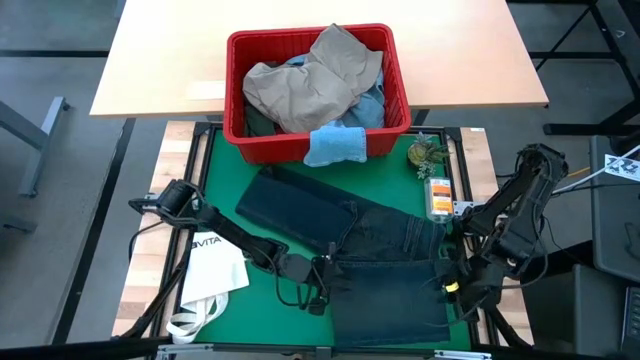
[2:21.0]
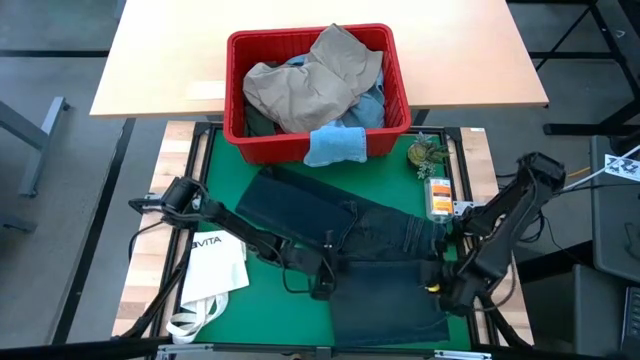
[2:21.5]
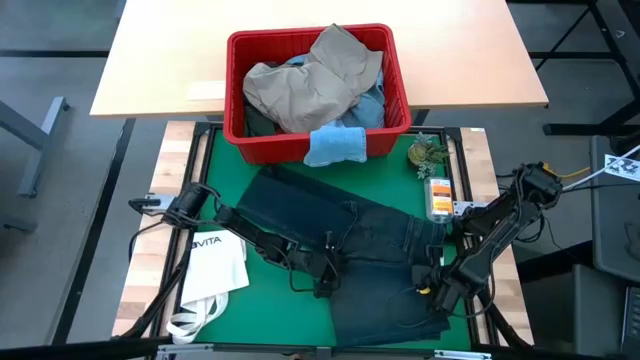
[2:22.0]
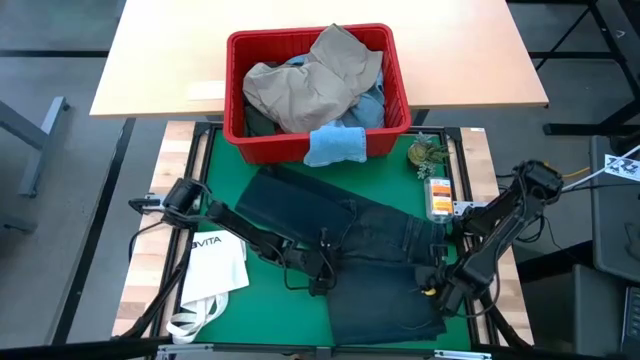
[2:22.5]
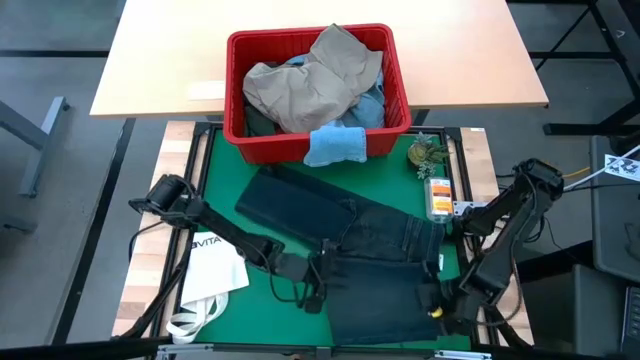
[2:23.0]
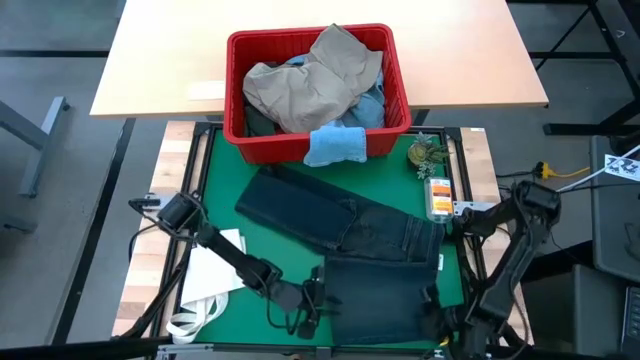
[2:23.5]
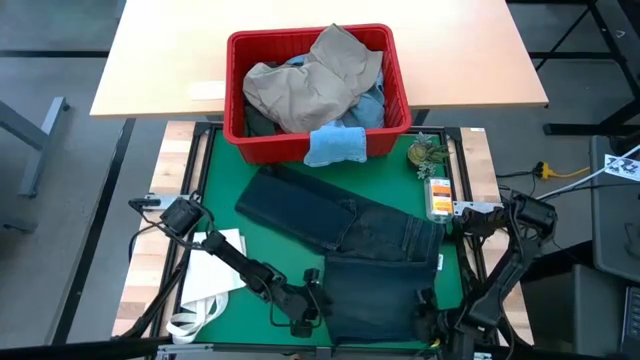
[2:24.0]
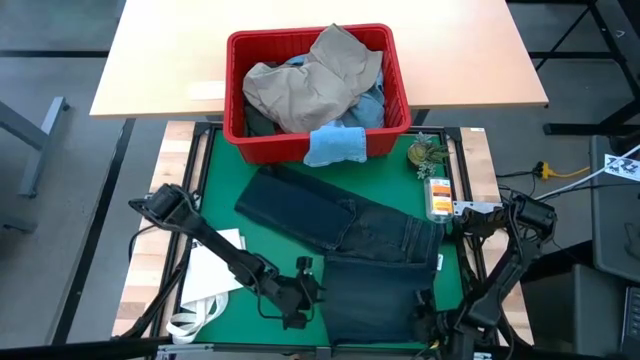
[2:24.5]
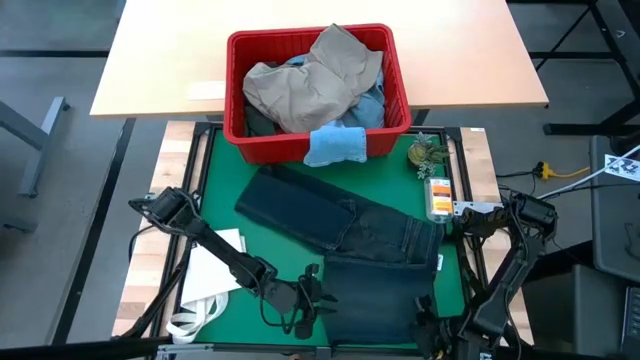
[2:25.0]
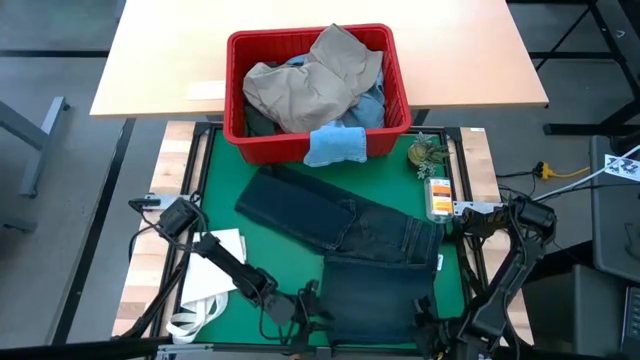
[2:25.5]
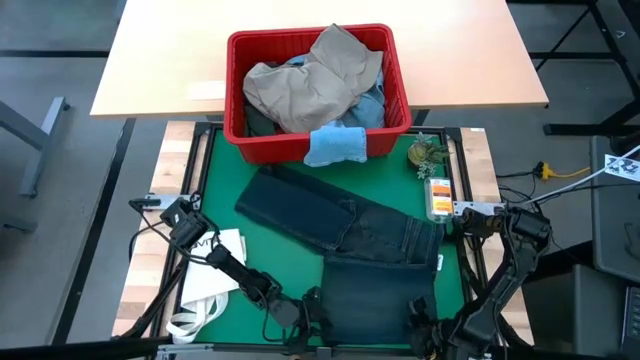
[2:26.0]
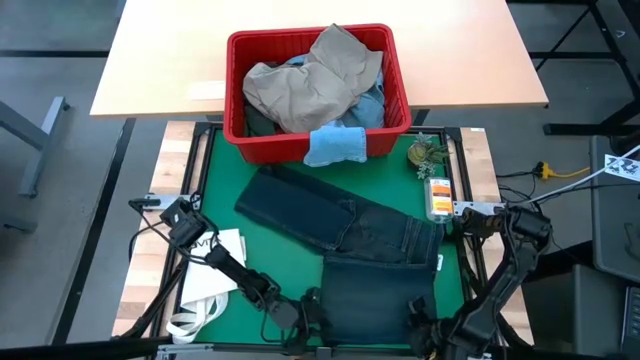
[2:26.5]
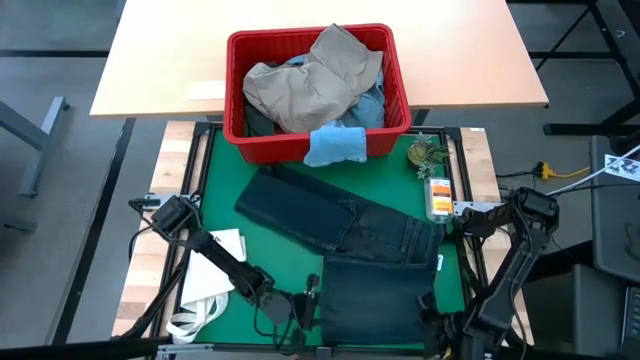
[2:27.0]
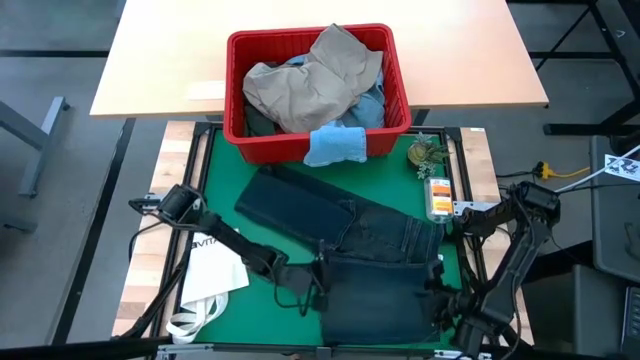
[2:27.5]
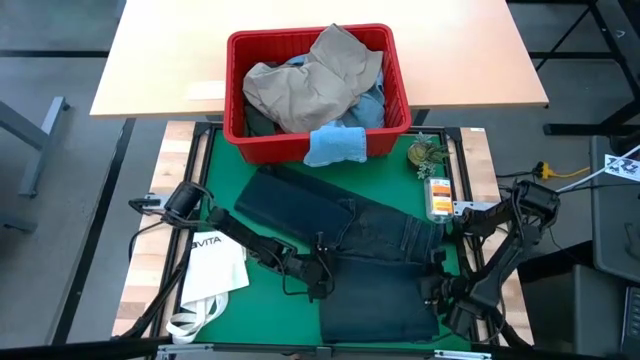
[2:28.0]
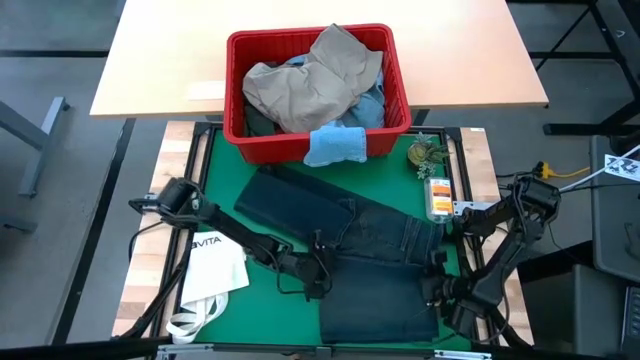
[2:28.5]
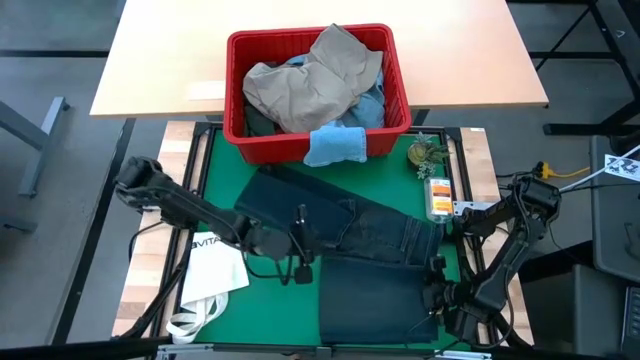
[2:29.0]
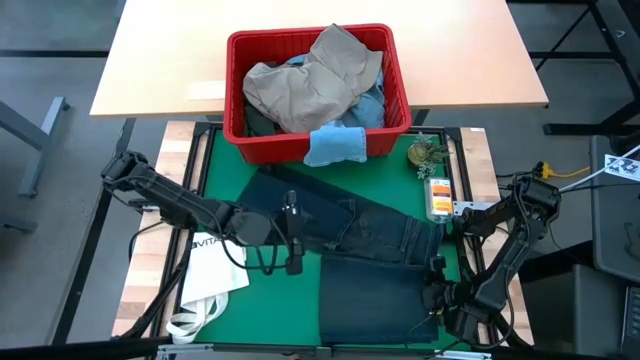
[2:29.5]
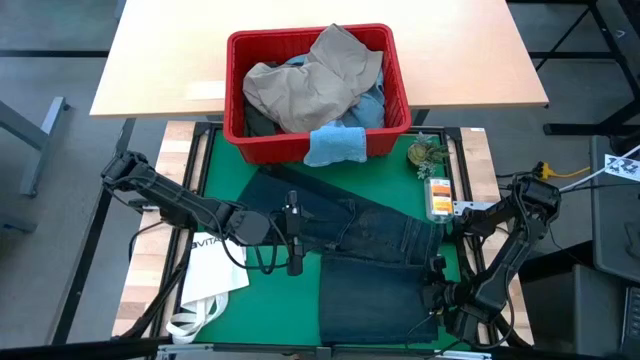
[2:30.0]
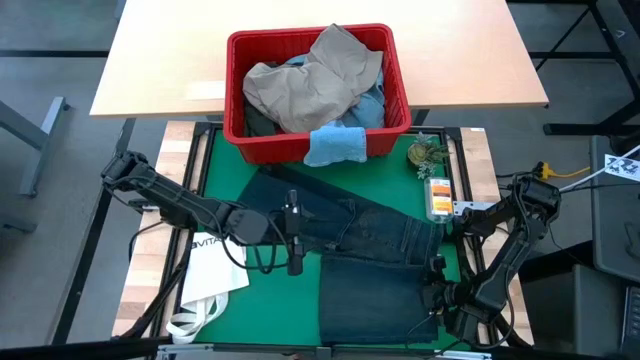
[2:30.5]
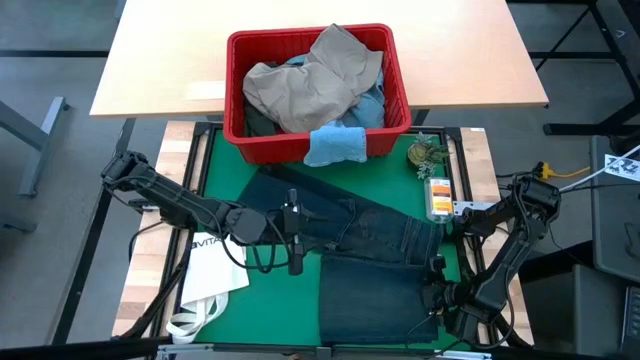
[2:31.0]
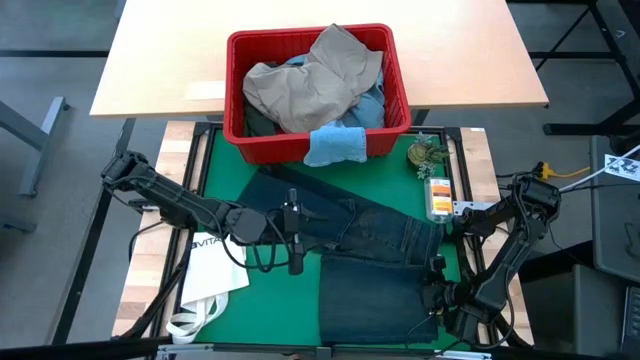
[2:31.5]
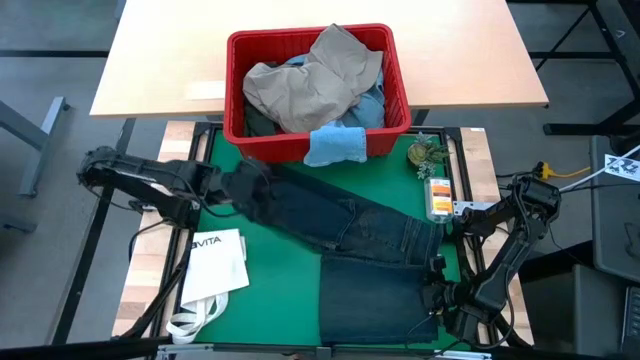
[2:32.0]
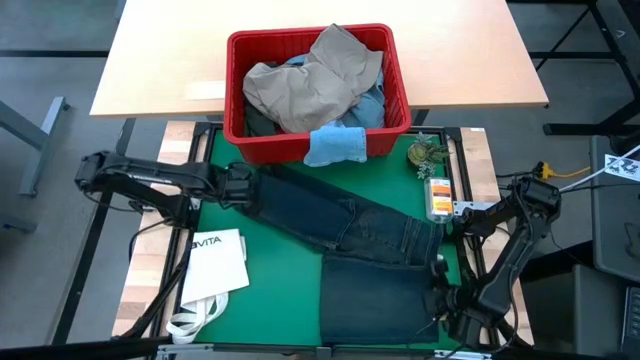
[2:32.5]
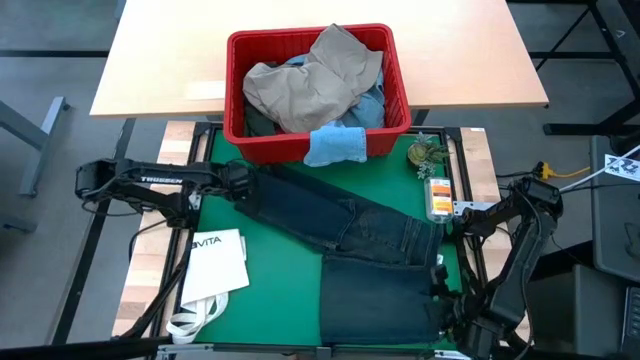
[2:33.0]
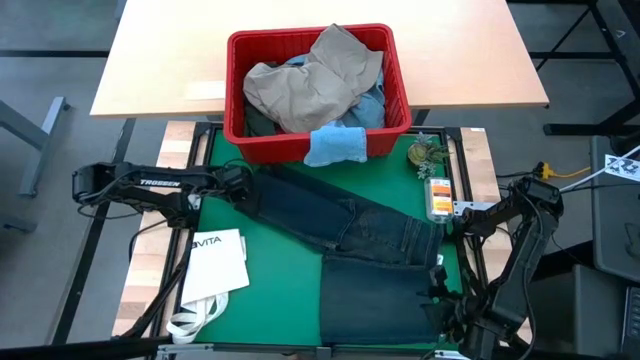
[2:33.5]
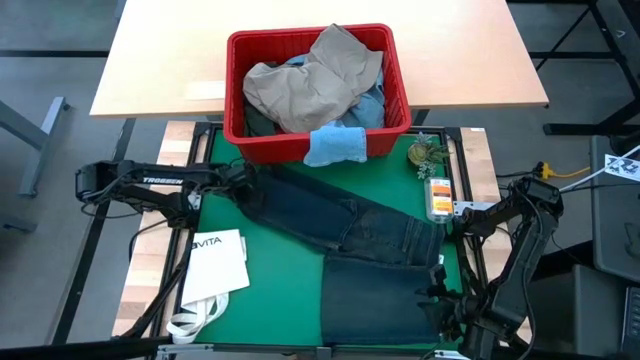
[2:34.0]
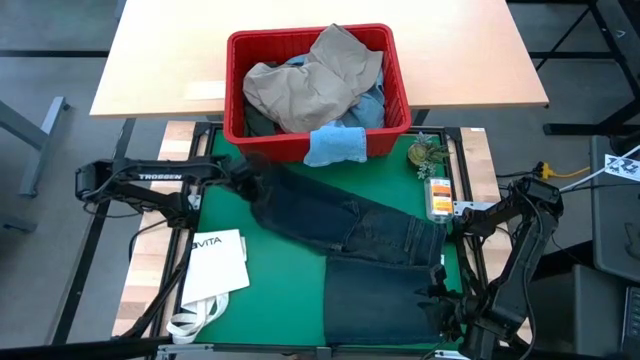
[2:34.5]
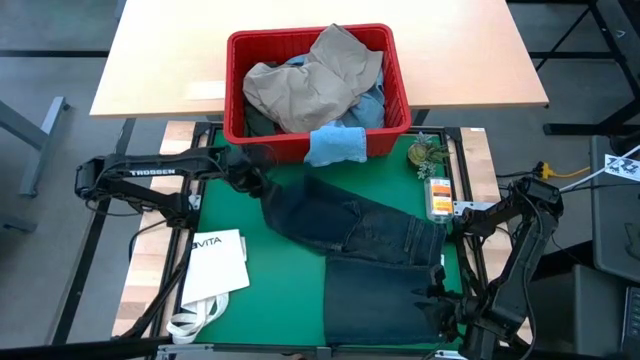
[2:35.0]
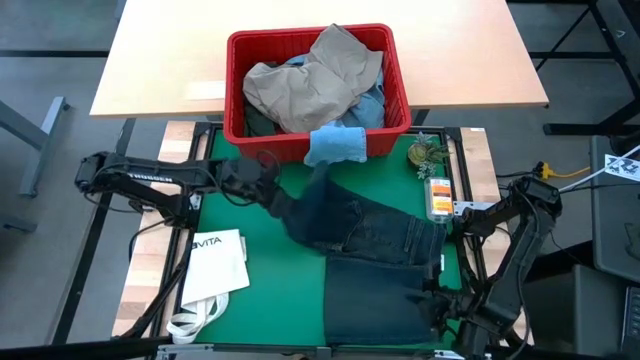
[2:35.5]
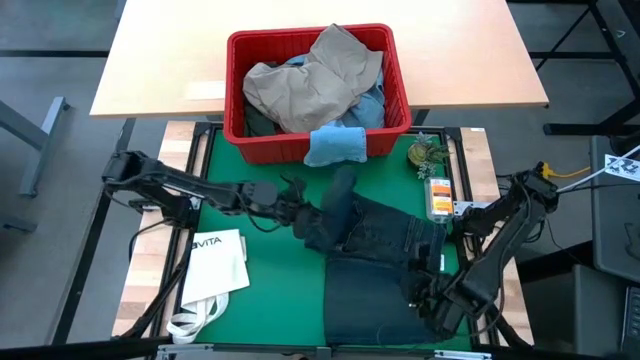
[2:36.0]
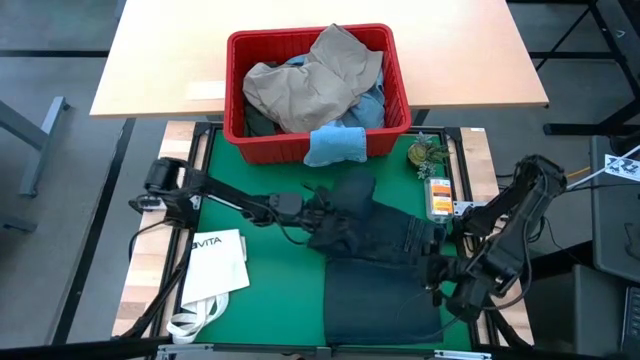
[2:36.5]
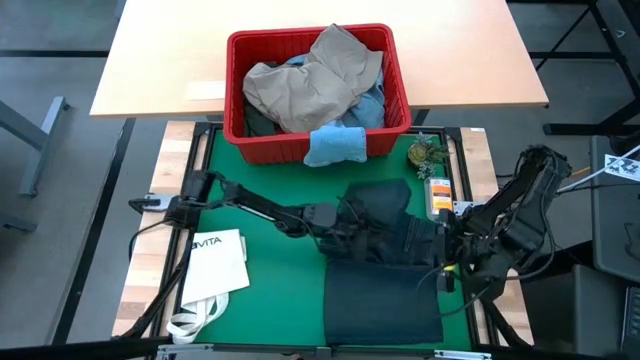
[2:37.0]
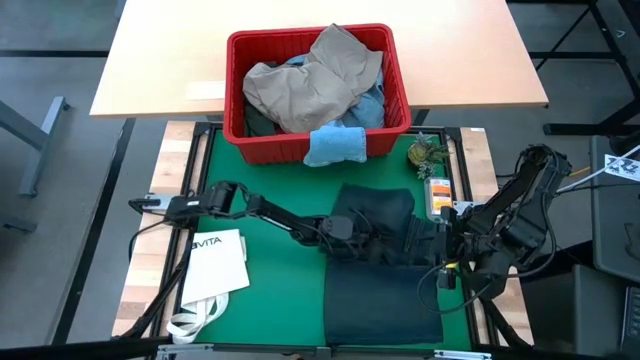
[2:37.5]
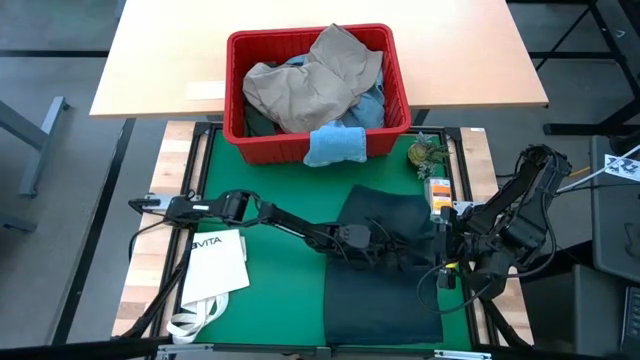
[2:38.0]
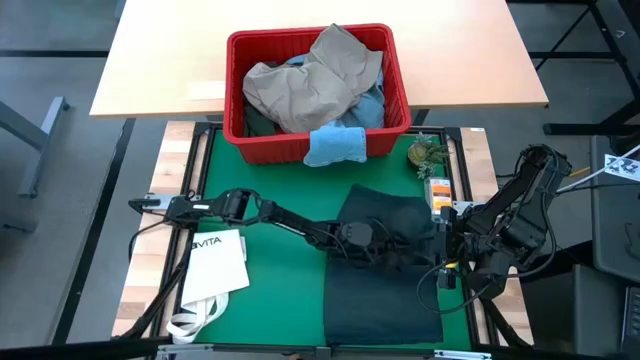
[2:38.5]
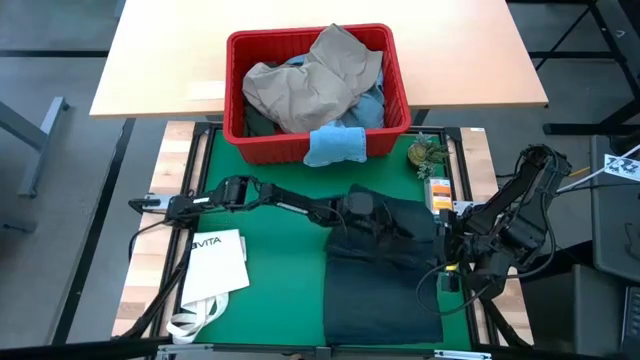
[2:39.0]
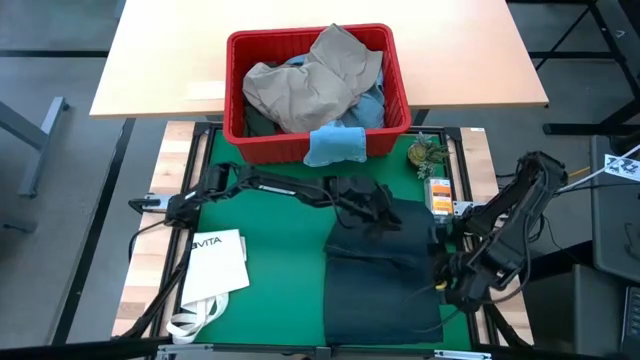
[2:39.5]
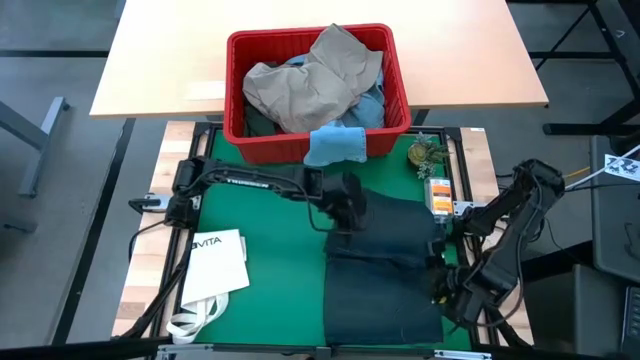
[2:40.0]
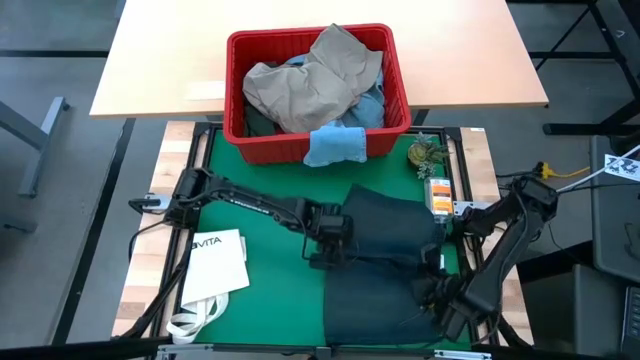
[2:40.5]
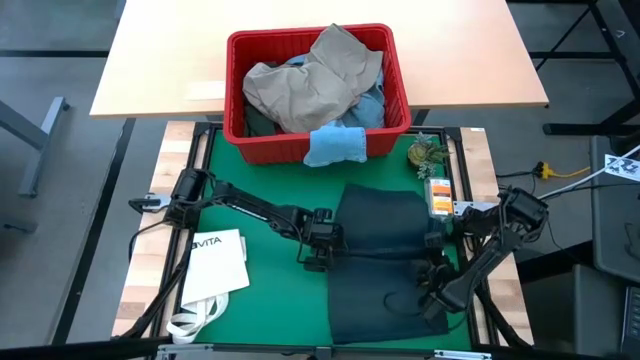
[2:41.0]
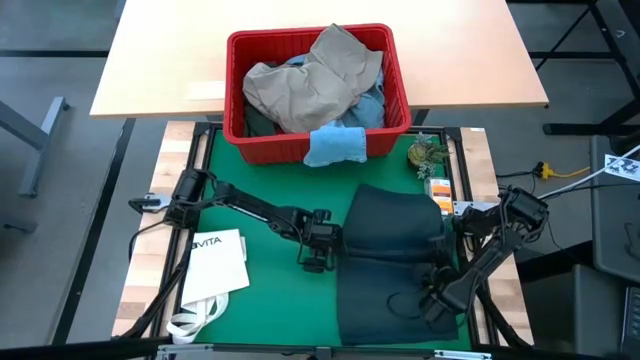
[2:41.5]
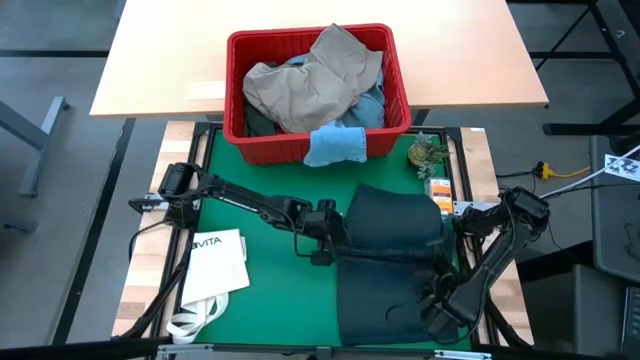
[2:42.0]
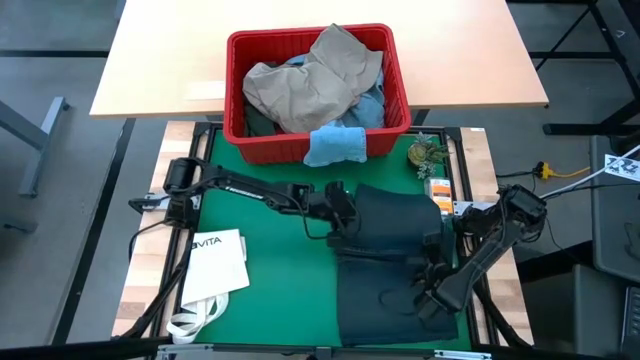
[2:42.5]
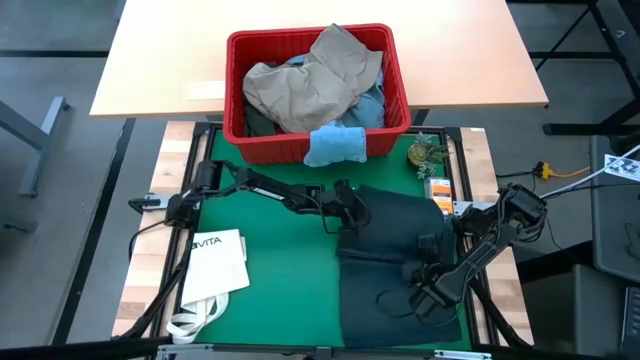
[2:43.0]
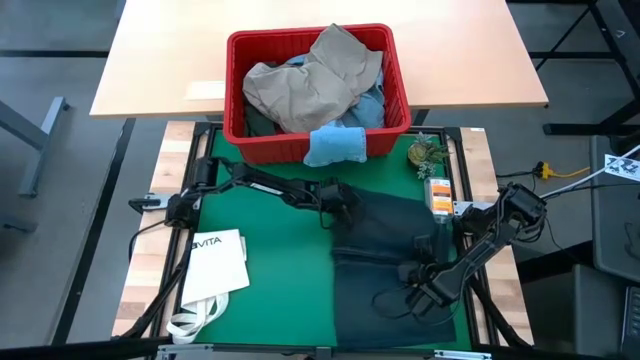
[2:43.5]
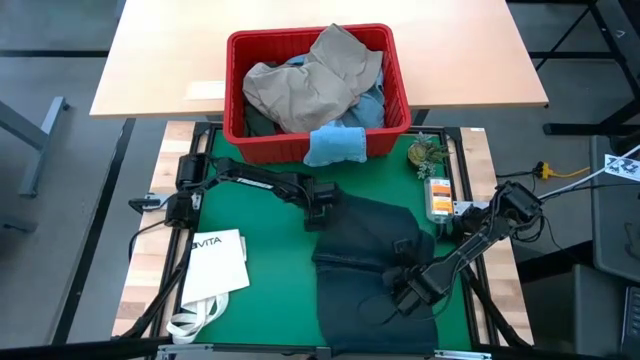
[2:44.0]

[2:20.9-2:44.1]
Task: Fold Laundry from Bin
Fold the dark blue pants
